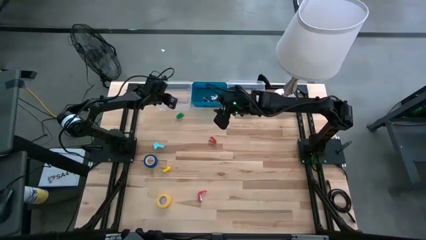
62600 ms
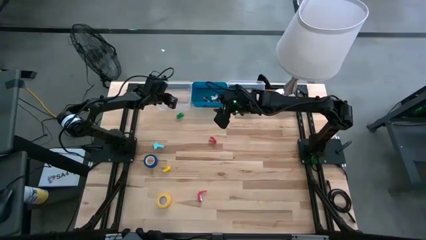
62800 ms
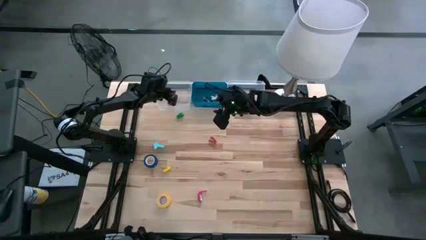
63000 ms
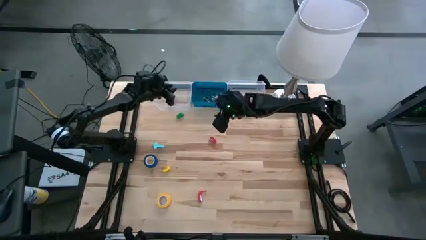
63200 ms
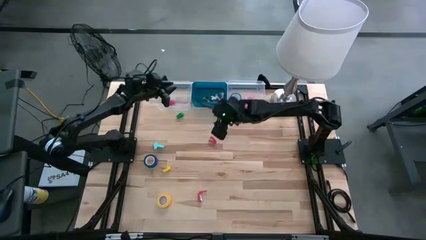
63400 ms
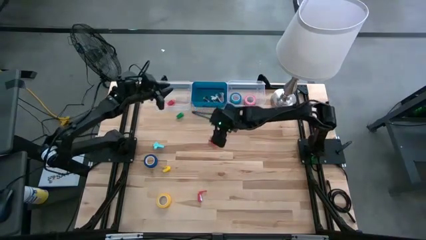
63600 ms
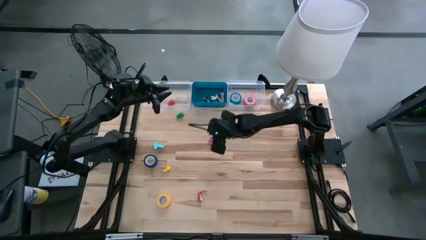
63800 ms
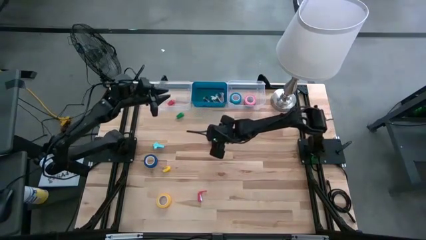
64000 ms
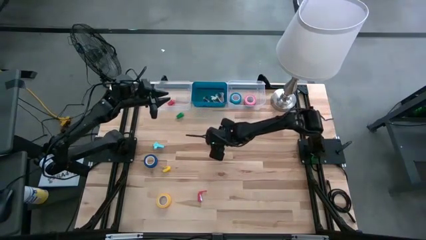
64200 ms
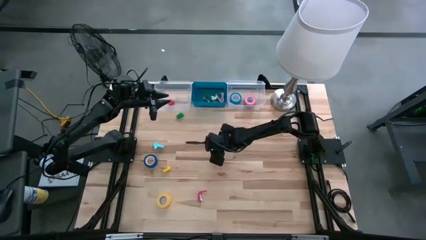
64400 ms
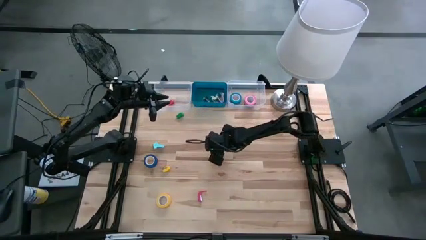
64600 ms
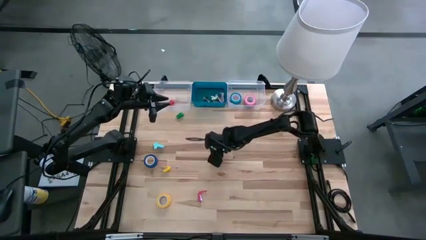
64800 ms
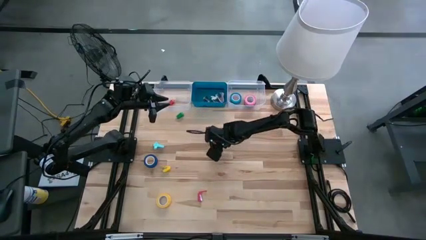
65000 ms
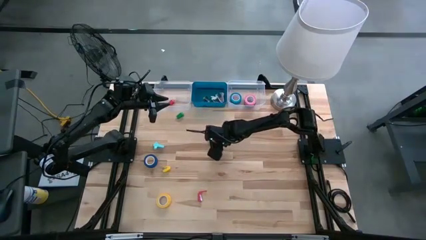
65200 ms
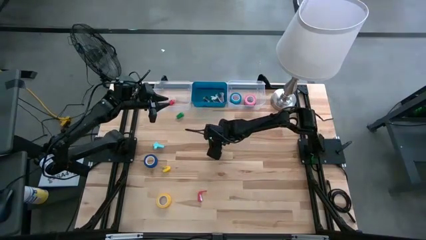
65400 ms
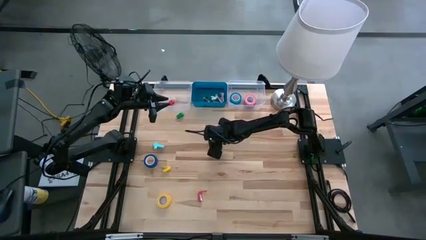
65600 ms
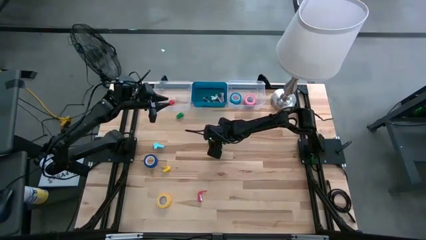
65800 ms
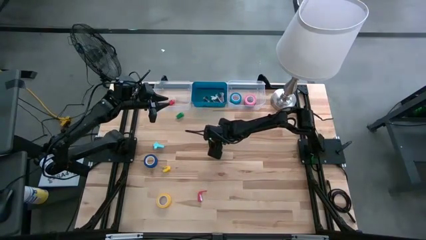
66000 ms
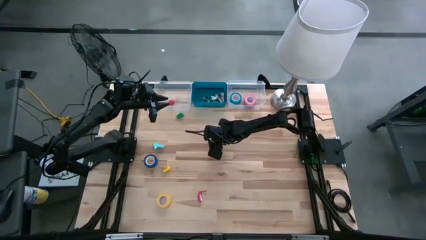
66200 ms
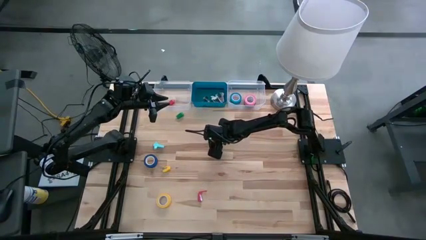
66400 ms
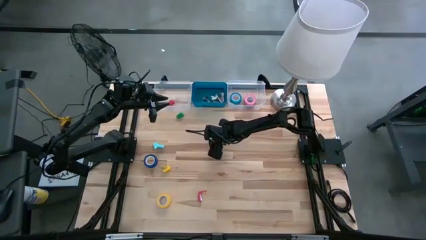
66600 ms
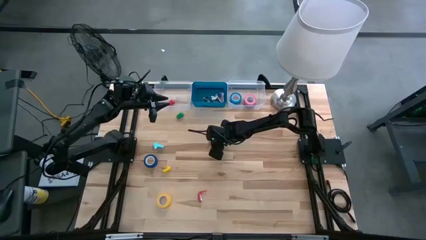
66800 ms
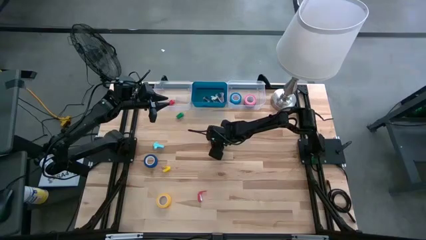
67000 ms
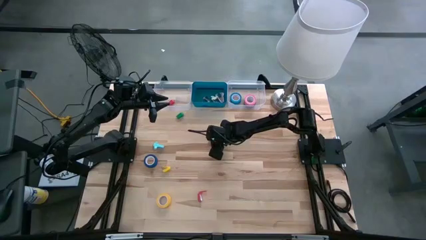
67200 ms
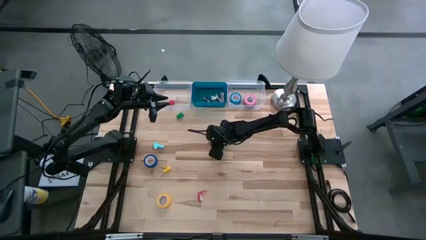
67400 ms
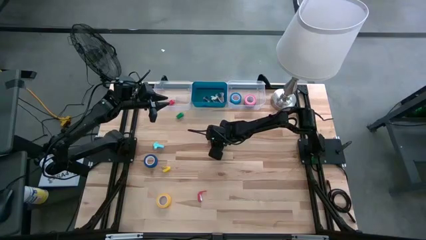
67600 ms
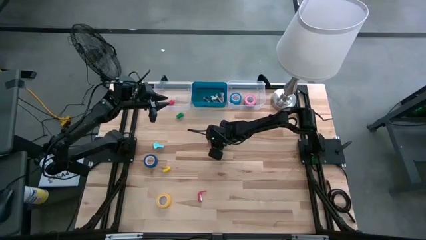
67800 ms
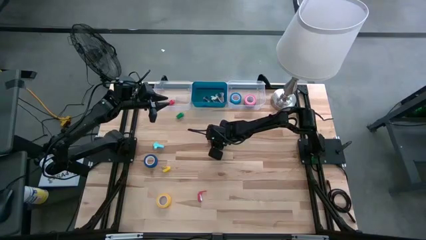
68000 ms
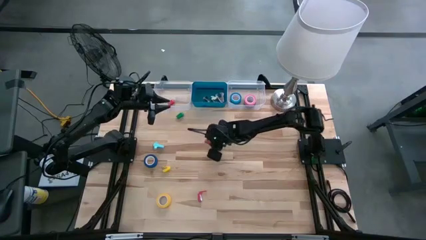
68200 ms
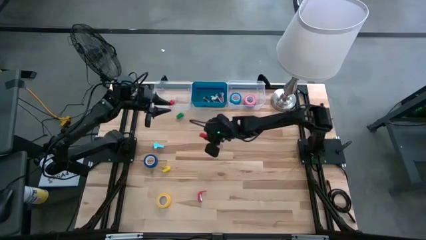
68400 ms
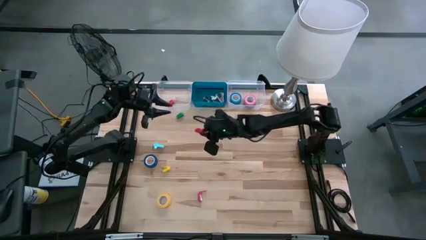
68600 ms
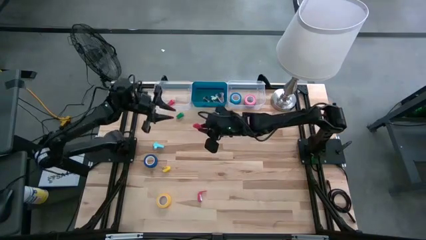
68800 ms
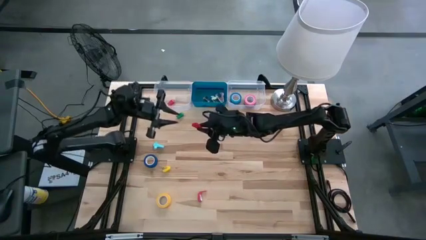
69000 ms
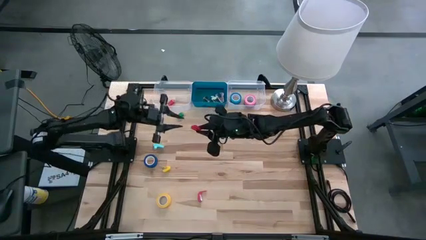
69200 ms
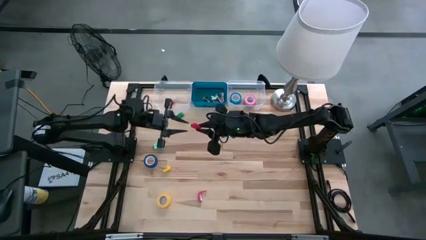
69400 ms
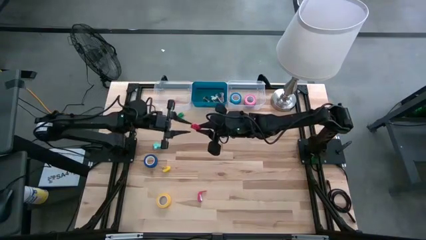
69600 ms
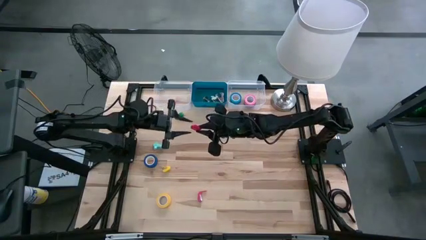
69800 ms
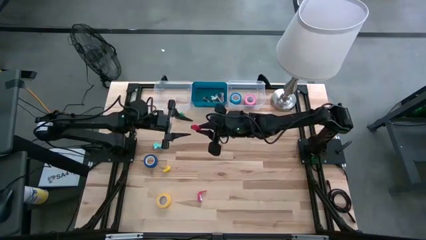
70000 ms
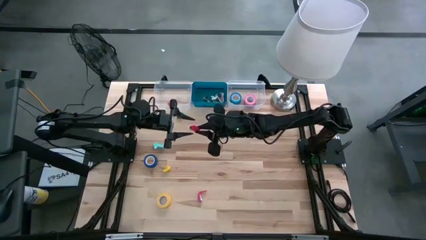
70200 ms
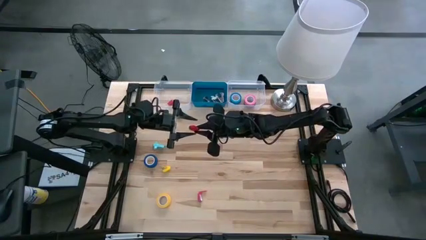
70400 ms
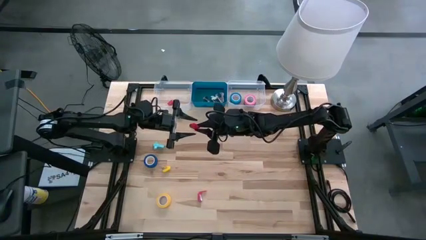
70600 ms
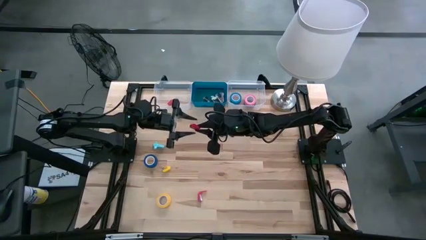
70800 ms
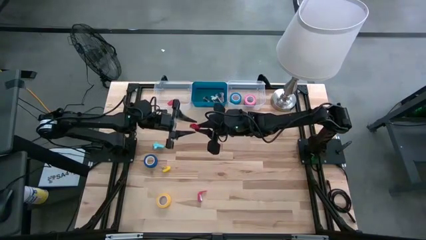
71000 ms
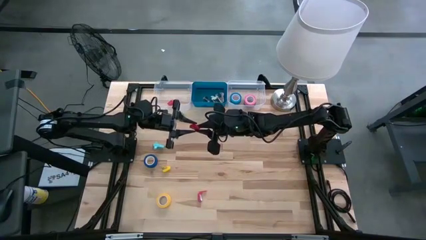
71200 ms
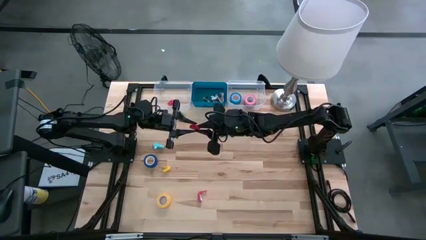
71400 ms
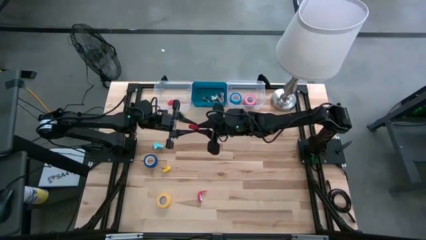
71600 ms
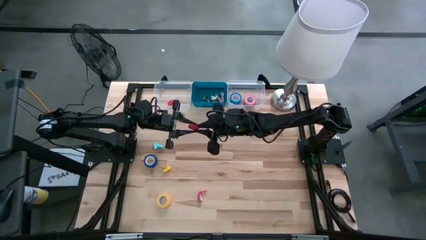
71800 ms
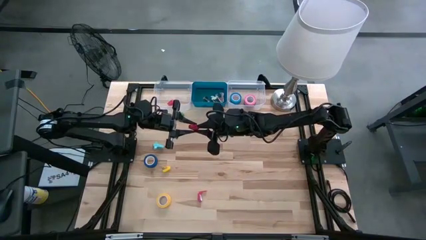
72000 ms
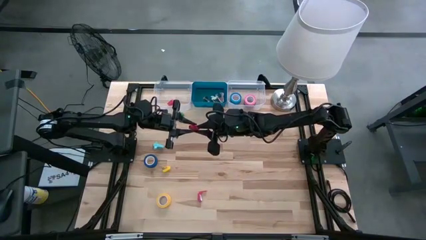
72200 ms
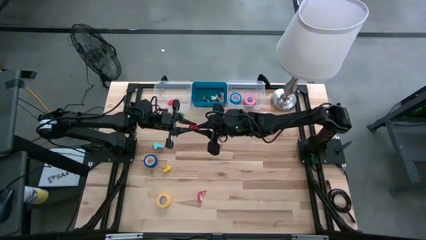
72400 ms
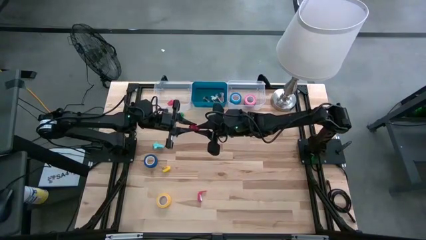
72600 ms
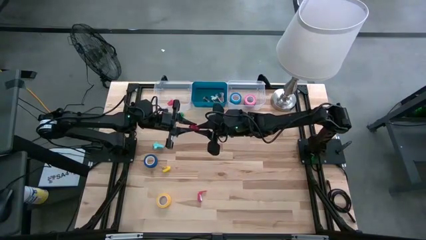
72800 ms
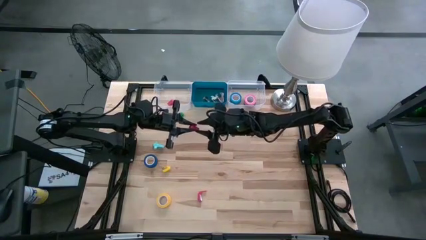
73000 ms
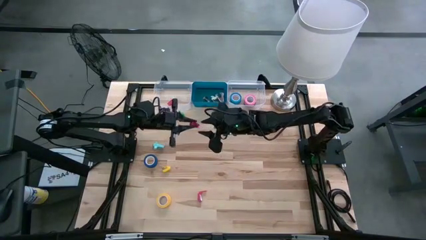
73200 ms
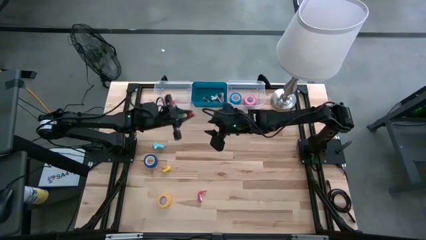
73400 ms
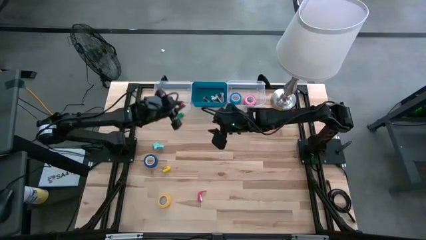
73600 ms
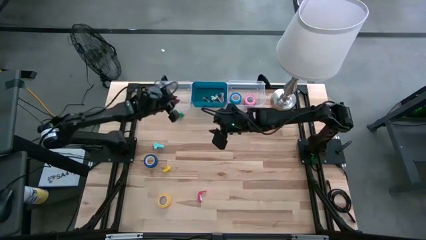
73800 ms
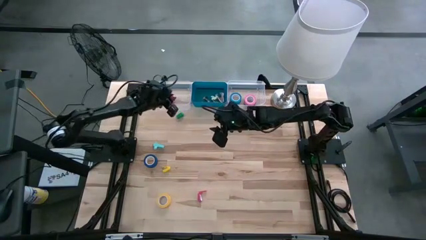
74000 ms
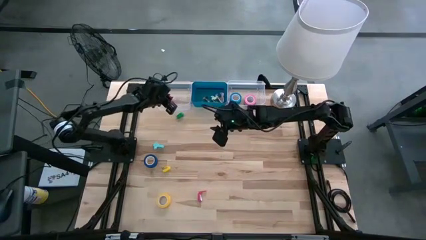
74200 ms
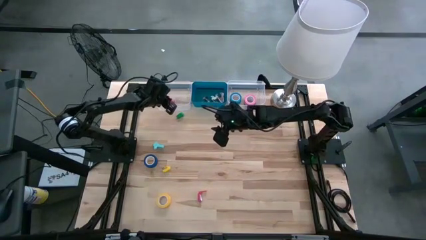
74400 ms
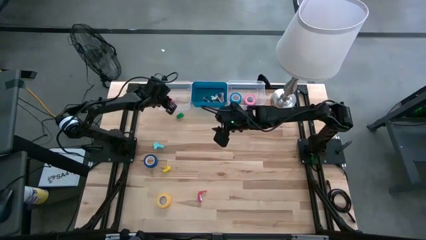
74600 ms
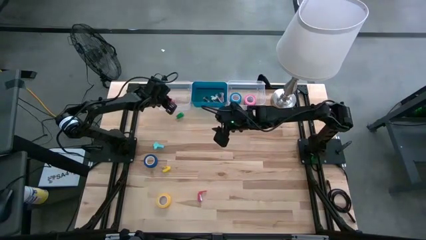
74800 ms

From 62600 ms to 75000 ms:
Task: Pick and place Stapler, Stapler remover, tape
Put the top red stapler into the left transparent bin

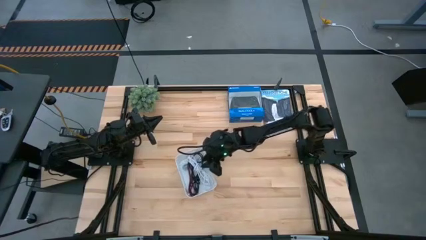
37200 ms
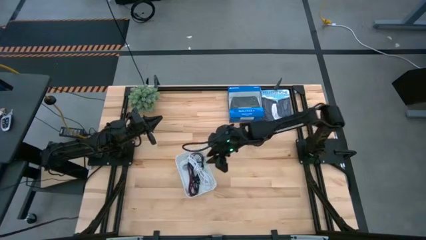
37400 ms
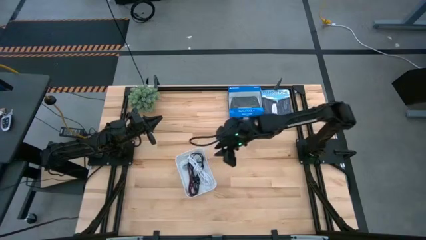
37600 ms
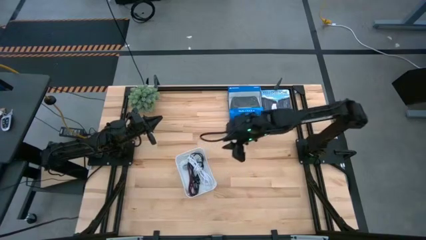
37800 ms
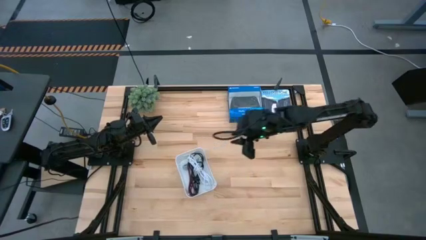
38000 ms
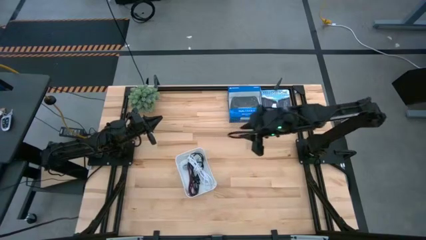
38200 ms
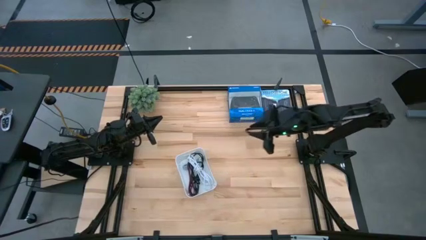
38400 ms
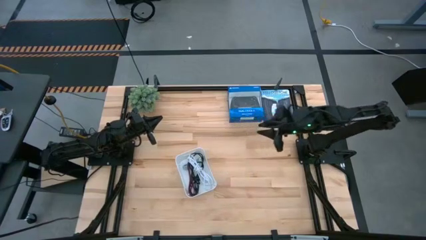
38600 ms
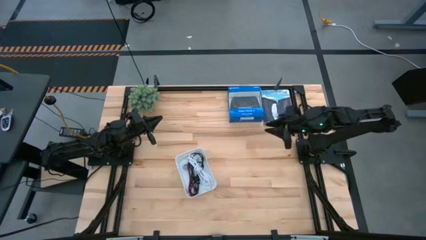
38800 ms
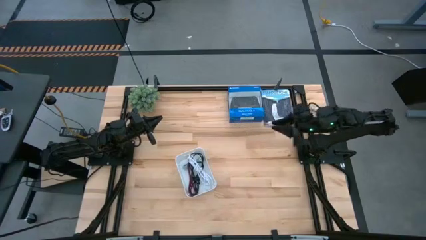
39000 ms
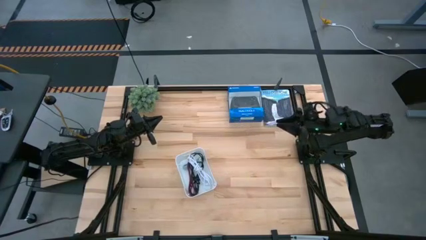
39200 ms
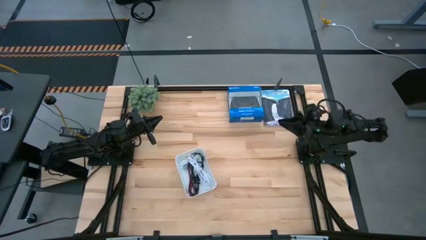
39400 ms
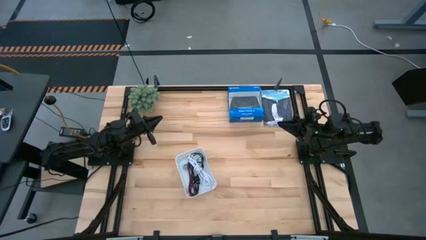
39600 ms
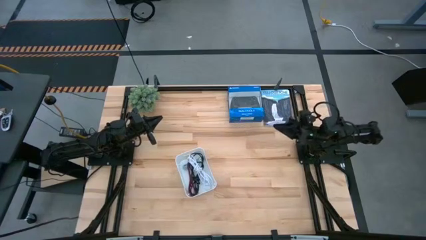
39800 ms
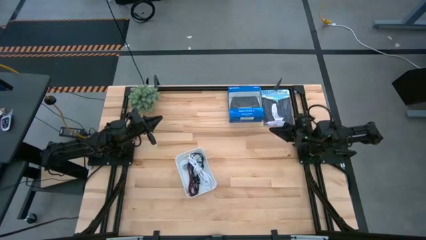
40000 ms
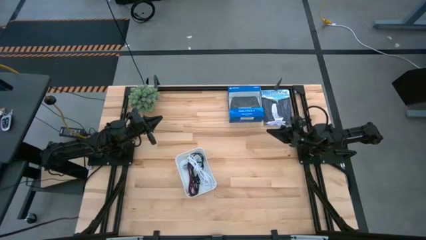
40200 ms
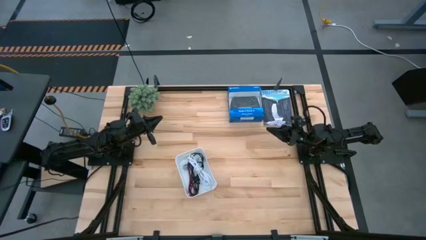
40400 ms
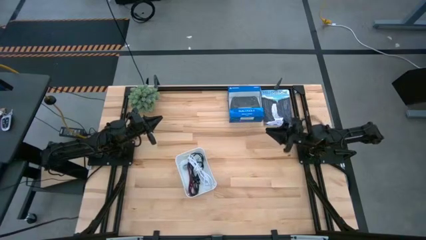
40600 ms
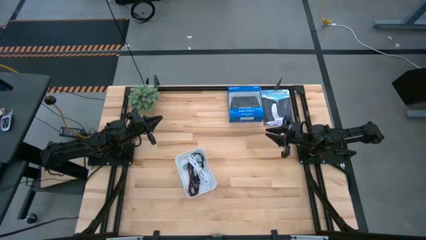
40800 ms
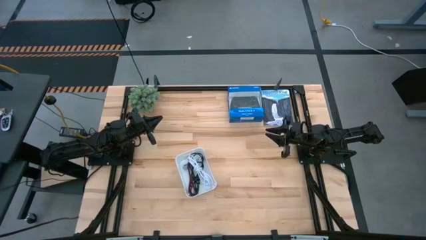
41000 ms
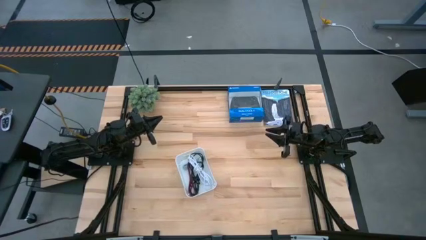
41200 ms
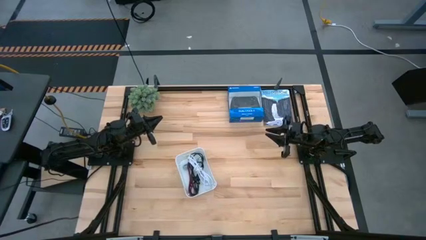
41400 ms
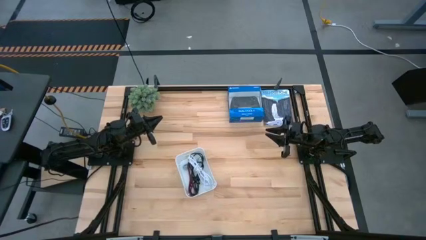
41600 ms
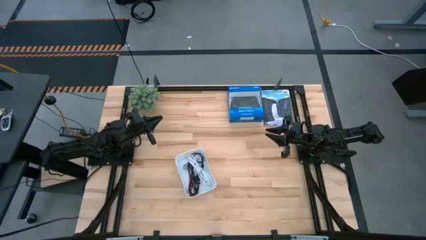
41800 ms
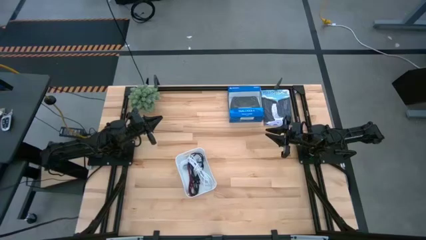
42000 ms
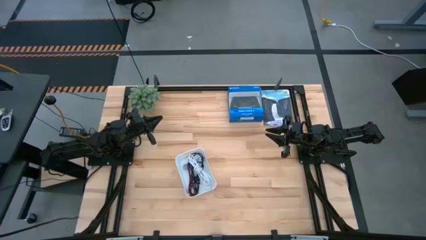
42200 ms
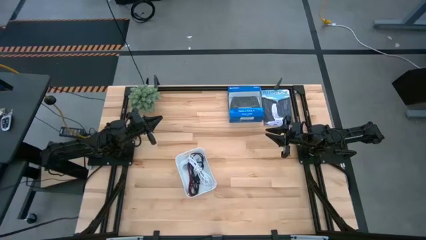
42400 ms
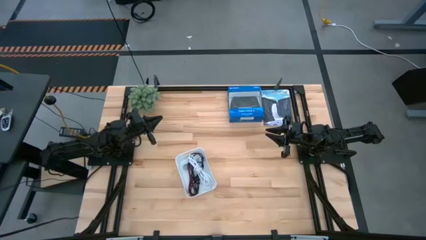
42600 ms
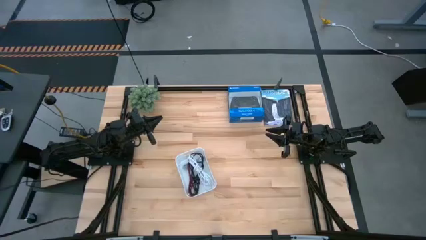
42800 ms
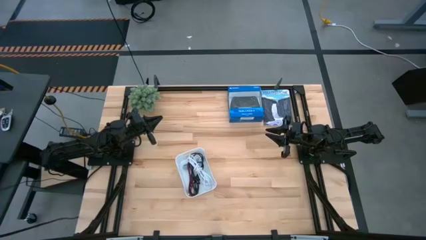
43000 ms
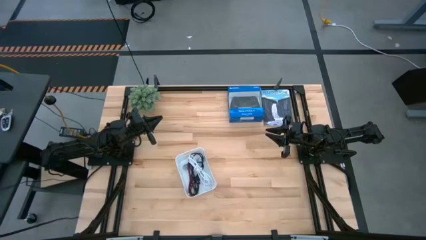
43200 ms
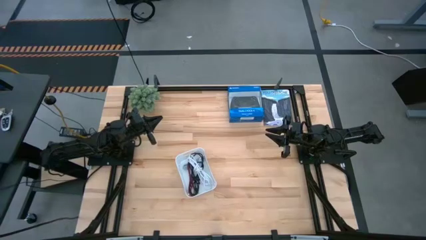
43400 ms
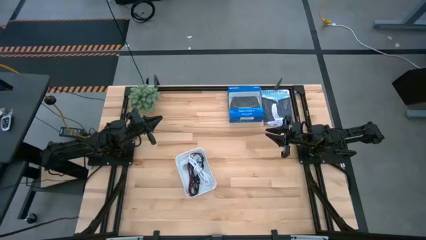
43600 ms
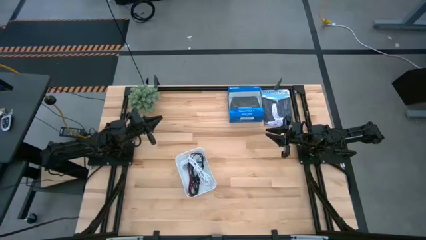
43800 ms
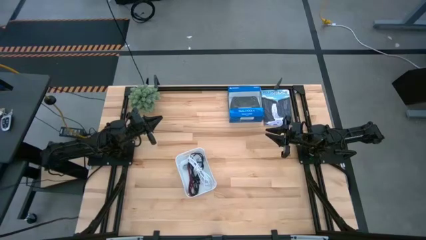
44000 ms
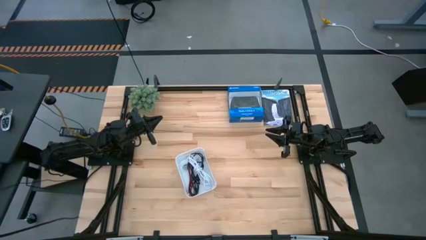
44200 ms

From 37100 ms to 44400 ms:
Task: Pick and place USB-C Cables
Return to Home Position
